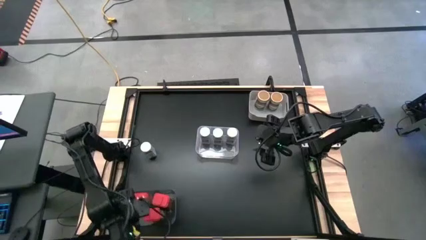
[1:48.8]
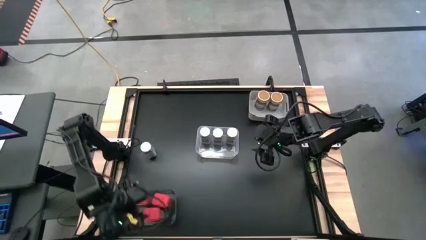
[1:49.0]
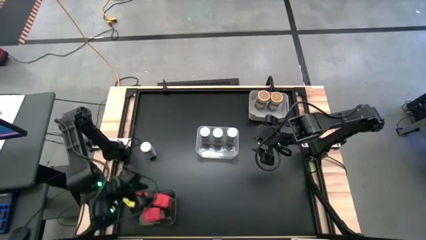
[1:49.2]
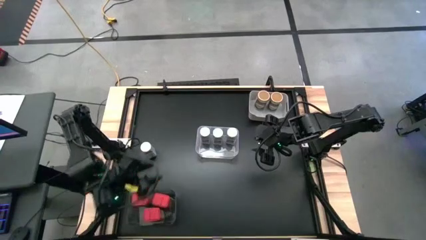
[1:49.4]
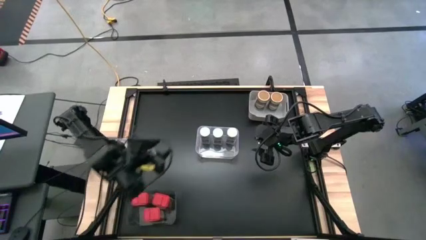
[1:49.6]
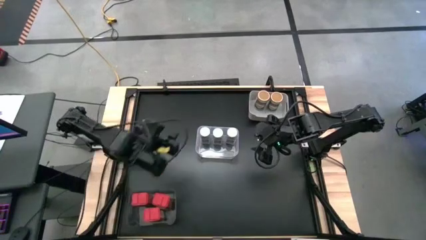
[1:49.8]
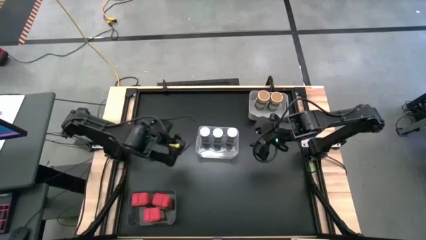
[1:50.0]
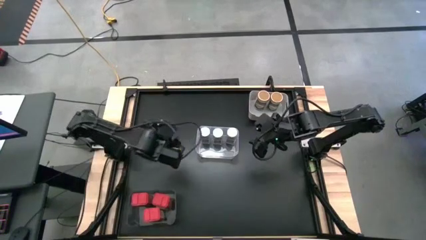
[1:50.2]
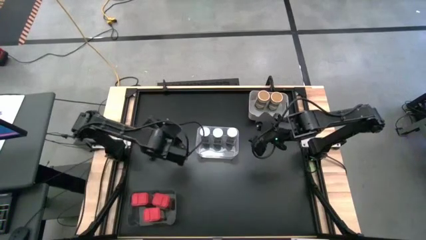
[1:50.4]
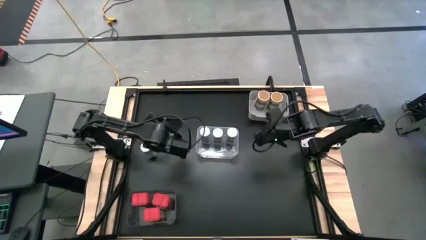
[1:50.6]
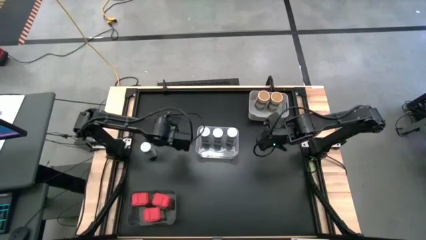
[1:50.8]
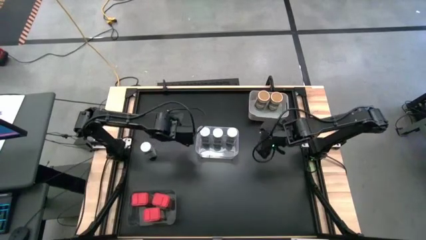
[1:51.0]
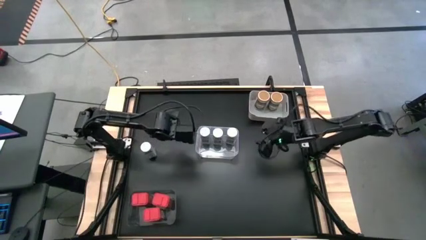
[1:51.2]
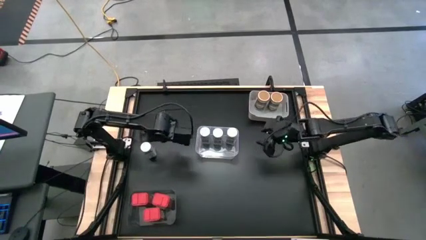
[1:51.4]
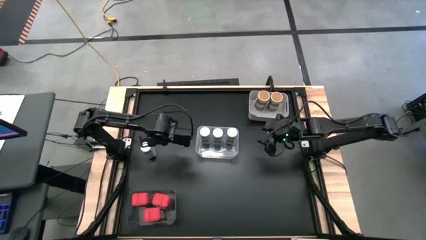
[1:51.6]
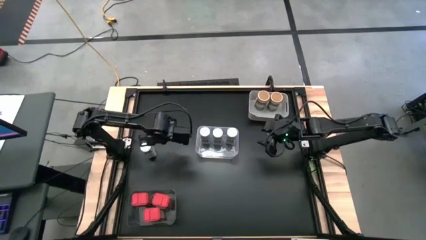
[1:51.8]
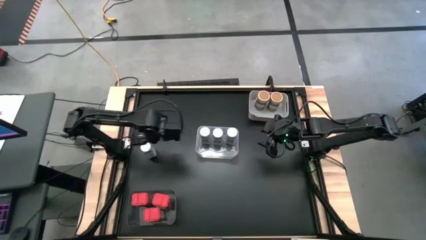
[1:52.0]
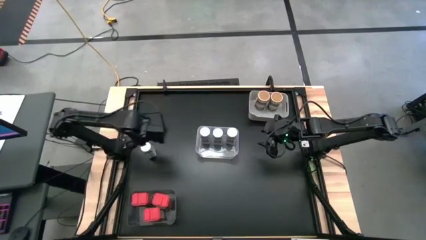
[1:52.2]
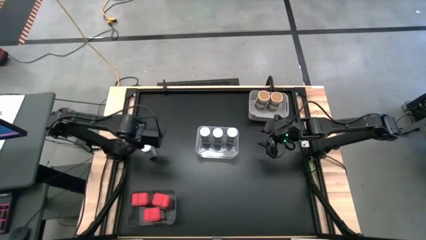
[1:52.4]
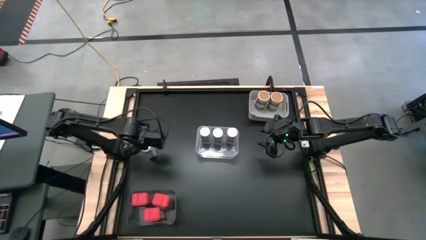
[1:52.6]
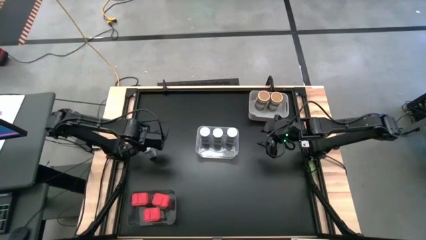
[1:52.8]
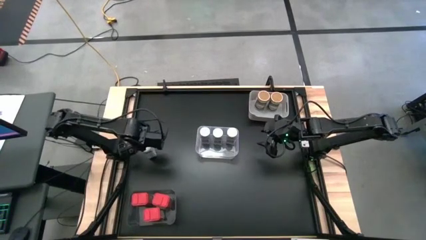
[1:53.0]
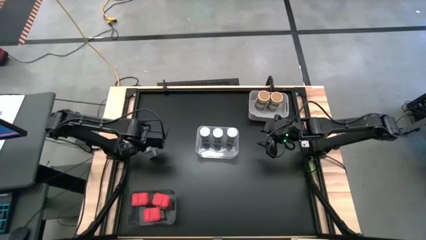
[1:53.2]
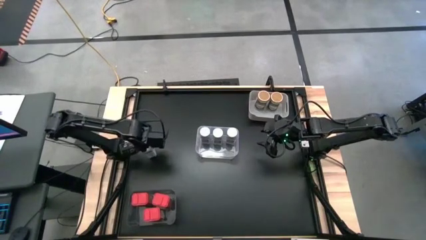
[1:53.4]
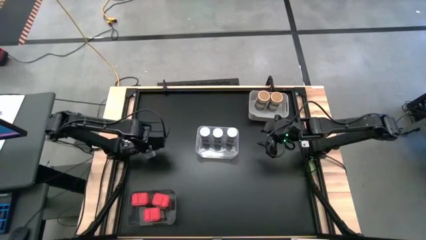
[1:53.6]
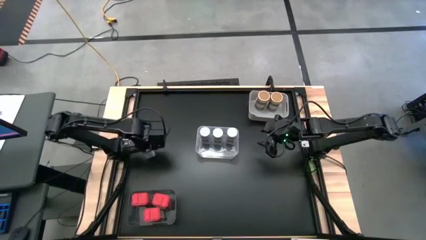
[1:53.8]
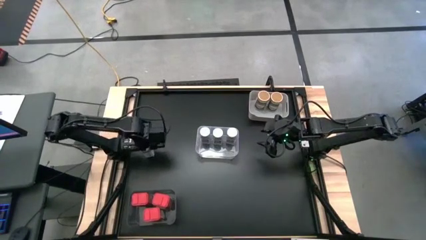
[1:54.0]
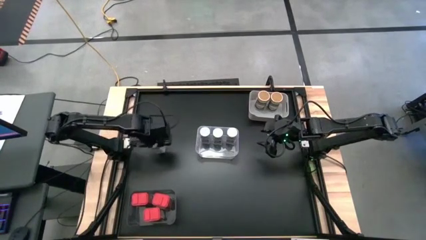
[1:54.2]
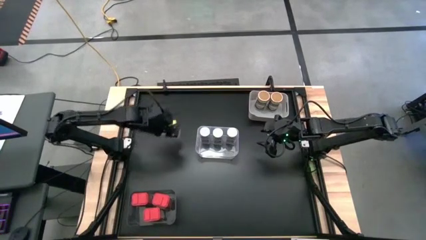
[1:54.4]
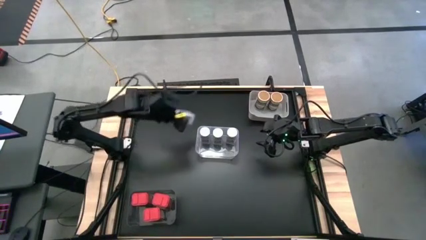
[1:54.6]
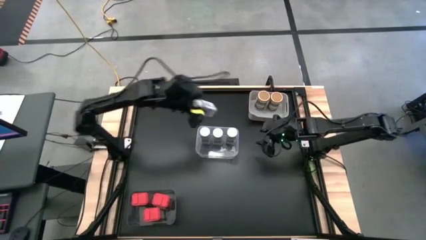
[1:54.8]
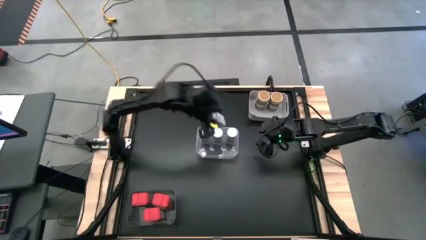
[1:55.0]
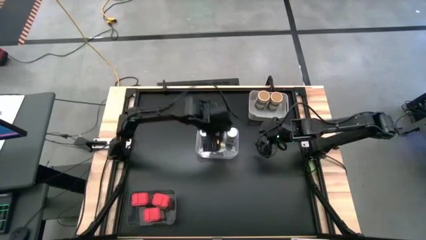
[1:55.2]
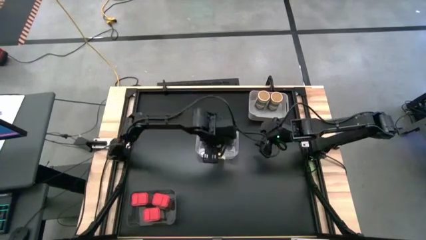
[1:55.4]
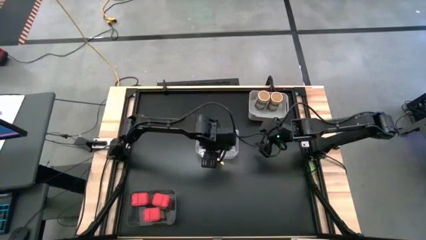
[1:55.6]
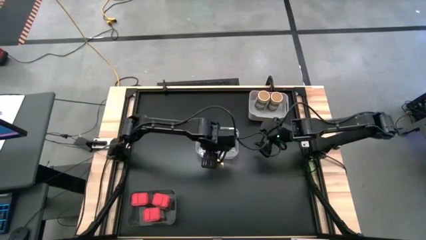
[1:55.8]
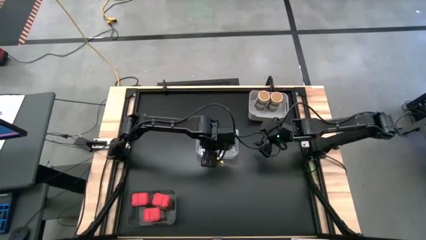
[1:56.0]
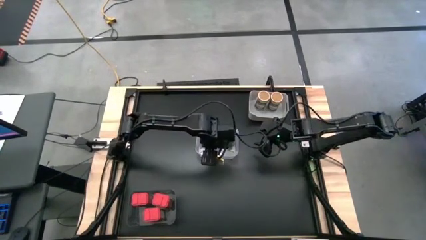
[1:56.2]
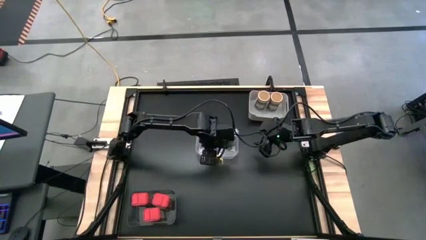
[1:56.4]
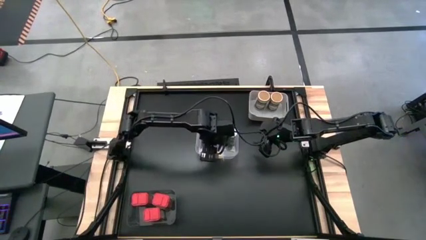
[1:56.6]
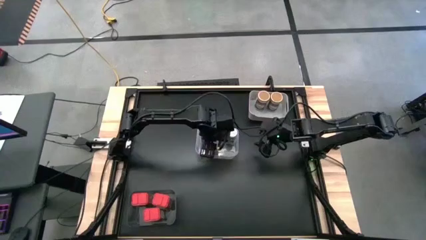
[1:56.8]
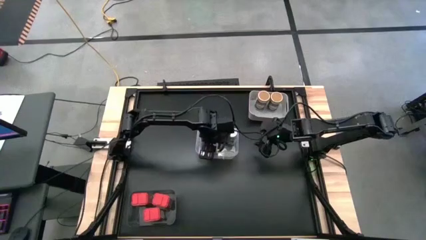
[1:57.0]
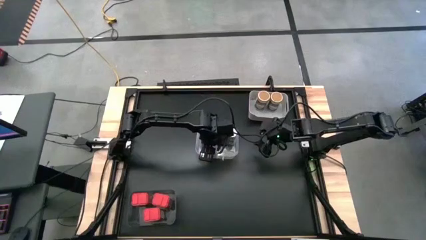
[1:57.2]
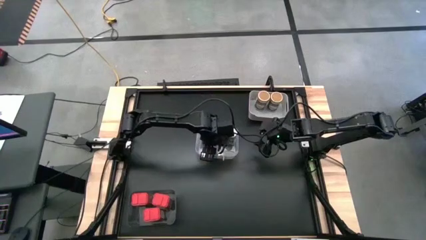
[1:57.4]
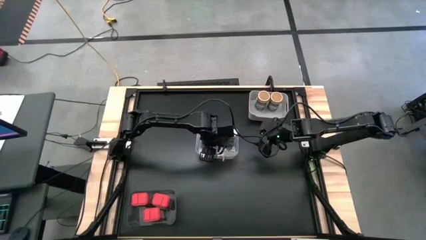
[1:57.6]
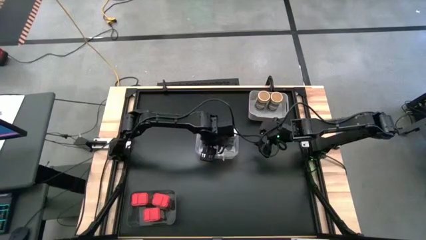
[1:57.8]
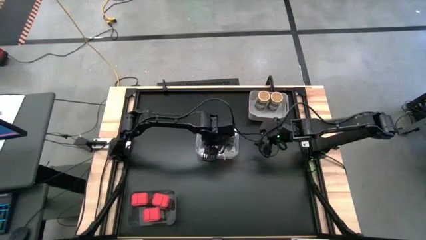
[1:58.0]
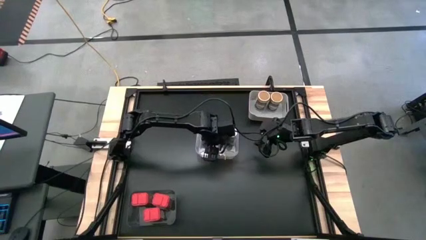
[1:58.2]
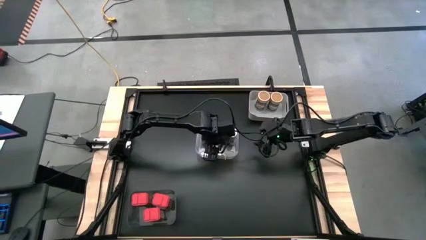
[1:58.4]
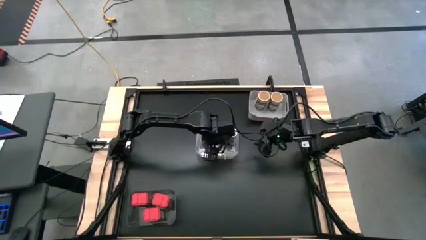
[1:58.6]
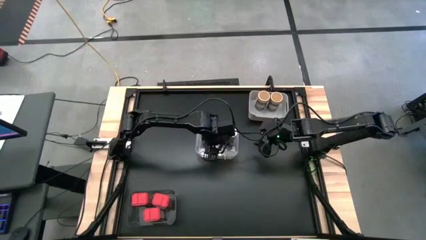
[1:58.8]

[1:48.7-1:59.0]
Task: Sort spices by type
Put the white seasoning bottle into the transparent bin

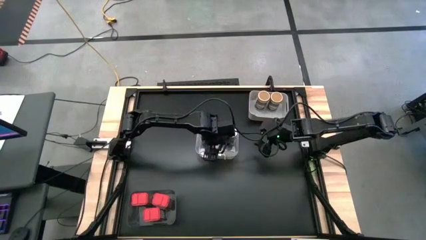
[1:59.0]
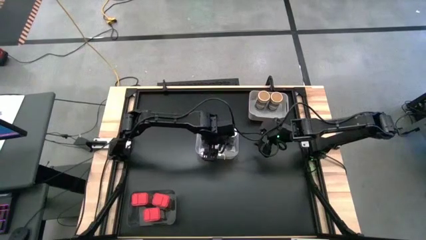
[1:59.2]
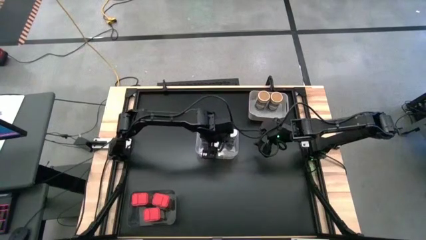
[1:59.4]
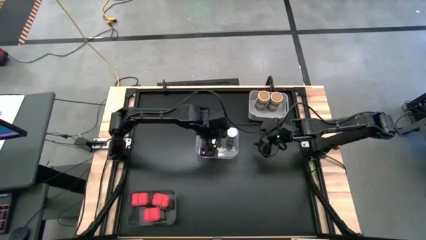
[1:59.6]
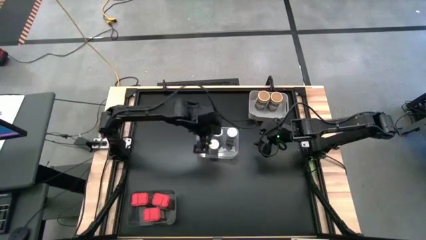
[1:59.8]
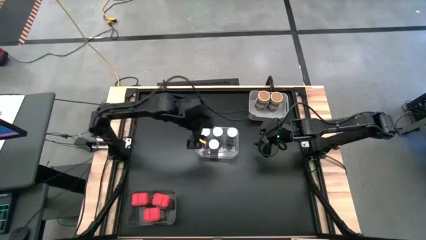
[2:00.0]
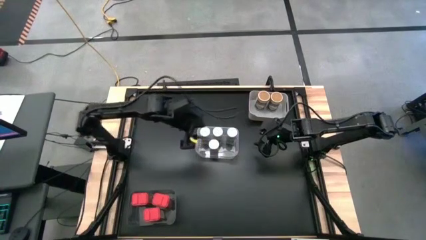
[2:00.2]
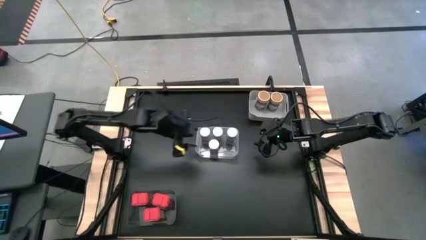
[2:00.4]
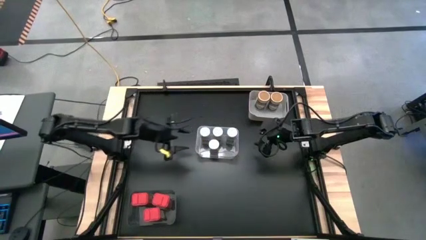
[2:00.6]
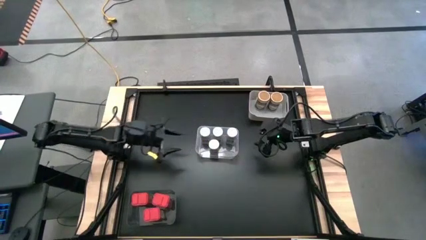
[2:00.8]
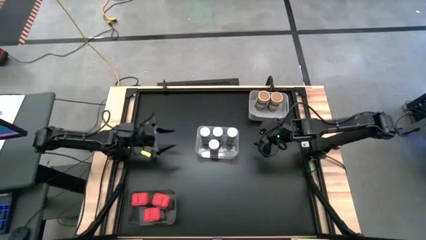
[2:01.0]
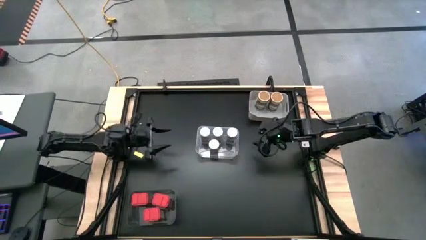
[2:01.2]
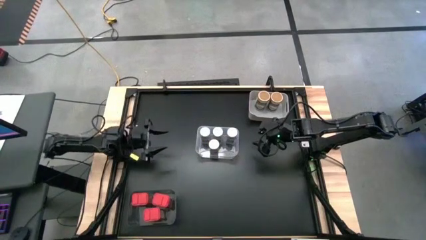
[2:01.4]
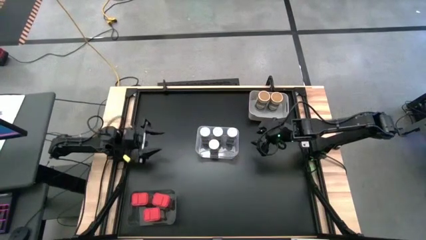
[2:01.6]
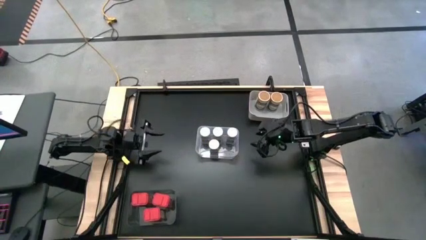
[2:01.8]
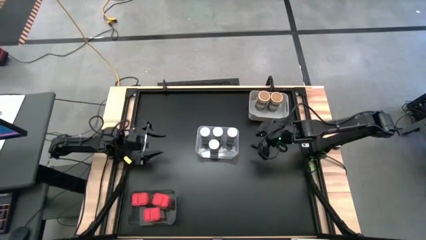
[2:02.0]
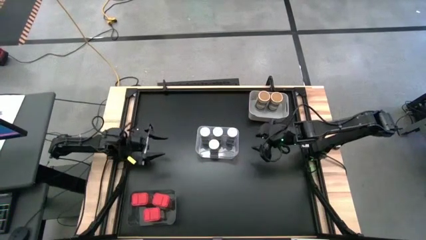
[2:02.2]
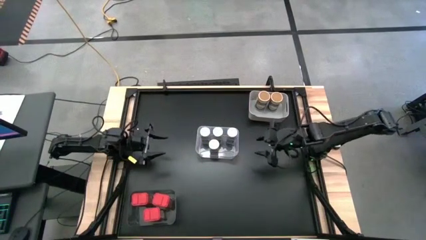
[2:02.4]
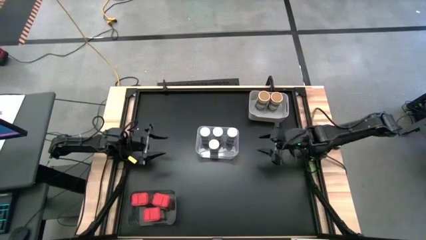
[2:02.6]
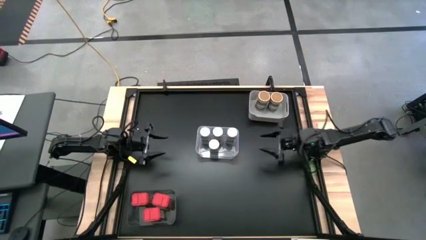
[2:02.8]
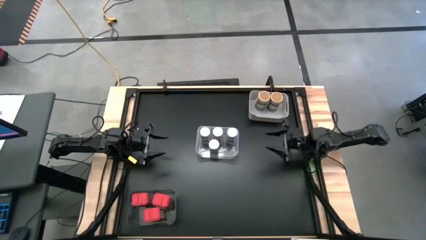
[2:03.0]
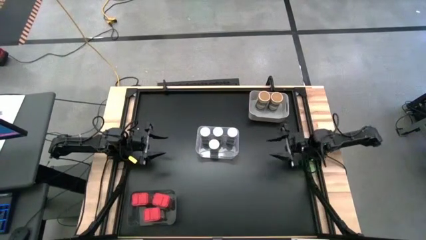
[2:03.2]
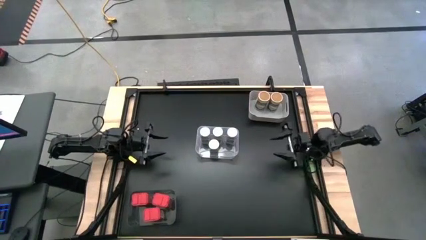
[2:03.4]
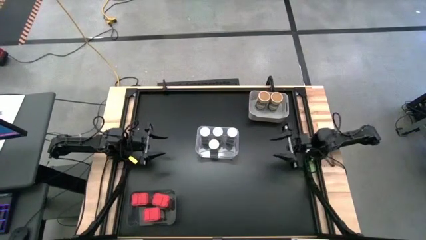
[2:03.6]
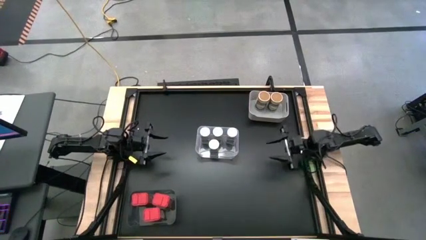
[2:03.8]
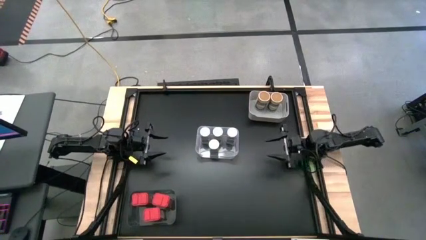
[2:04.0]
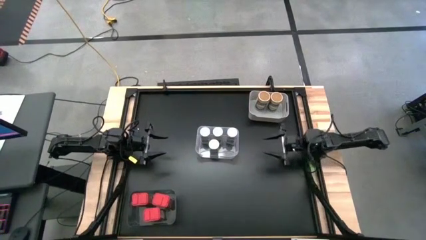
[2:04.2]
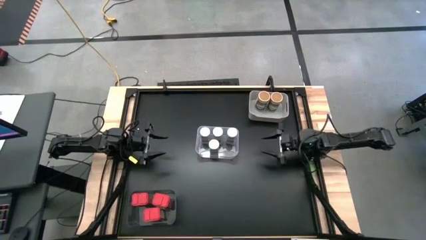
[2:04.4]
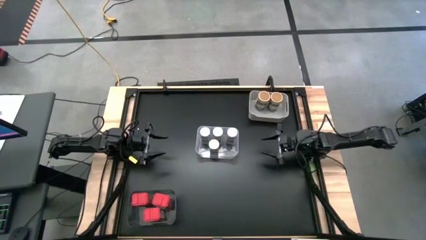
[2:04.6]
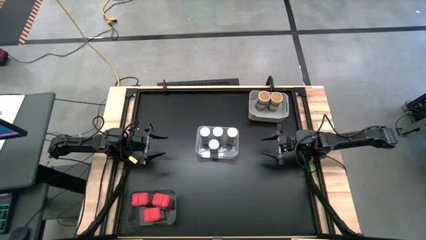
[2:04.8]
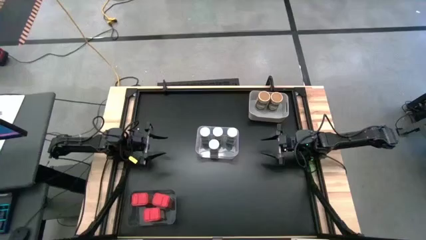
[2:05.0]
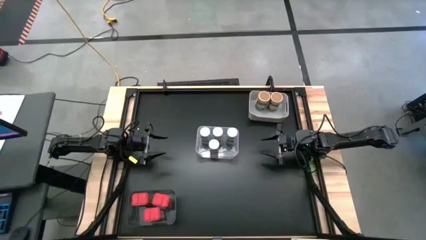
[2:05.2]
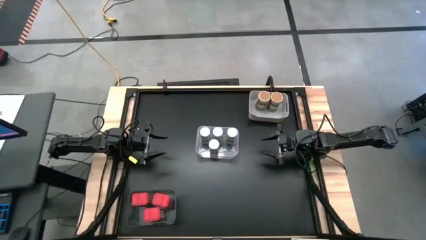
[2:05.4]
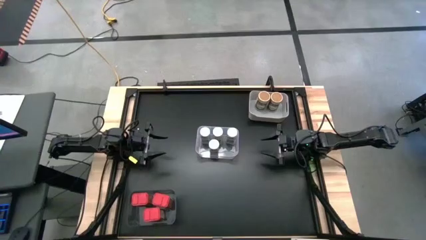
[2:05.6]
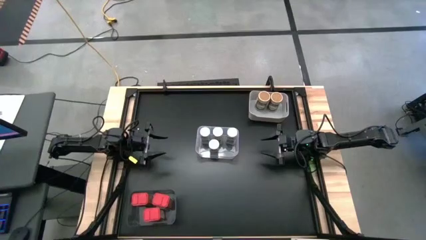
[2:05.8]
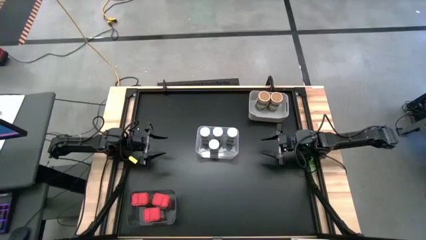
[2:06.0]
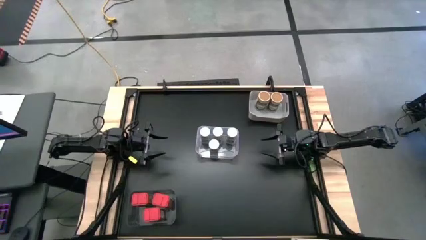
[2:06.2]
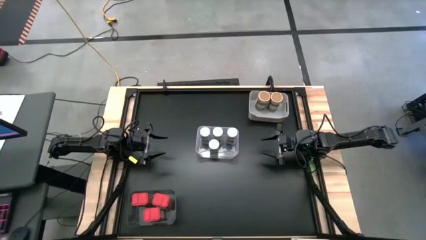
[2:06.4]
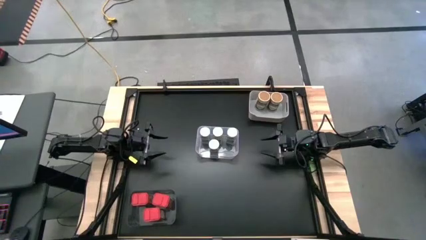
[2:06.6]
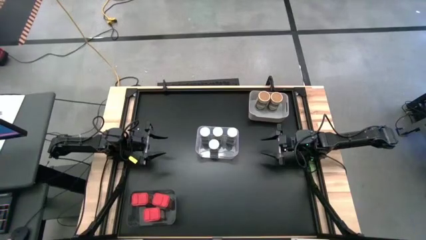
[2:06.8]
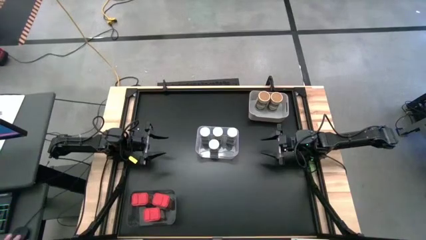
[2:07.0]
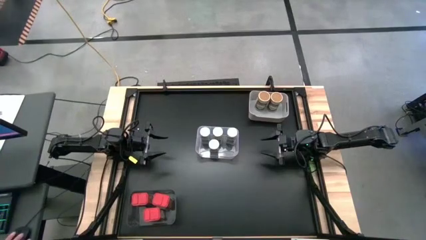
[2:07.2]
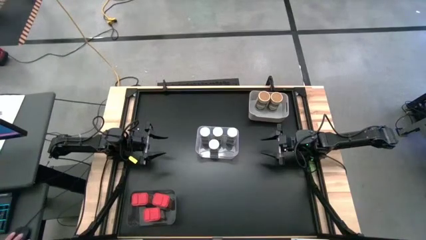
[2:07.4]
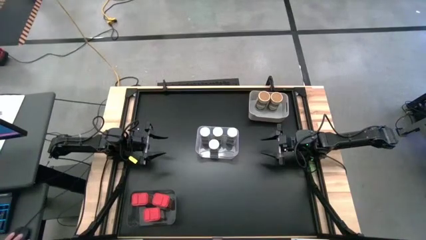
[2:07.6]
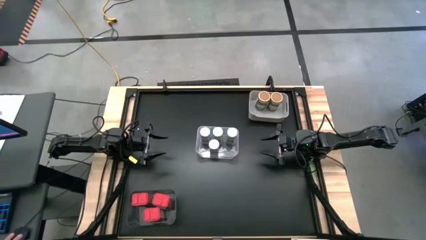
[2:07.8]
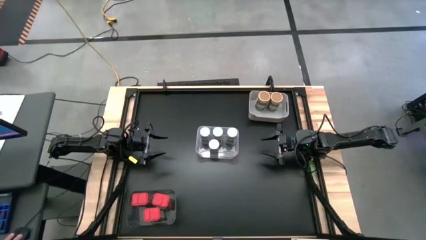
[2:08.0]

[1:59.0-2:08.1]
Return to Home Position
